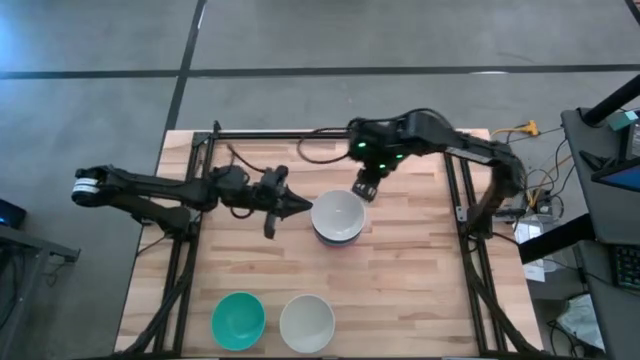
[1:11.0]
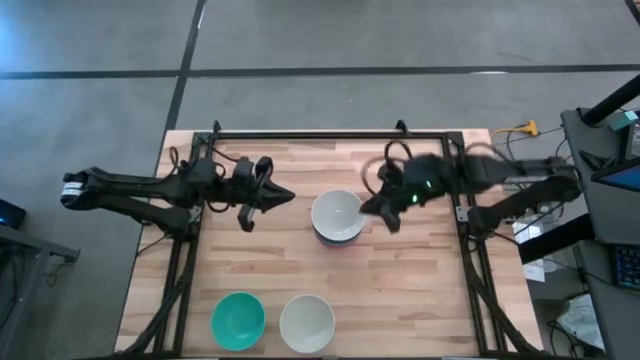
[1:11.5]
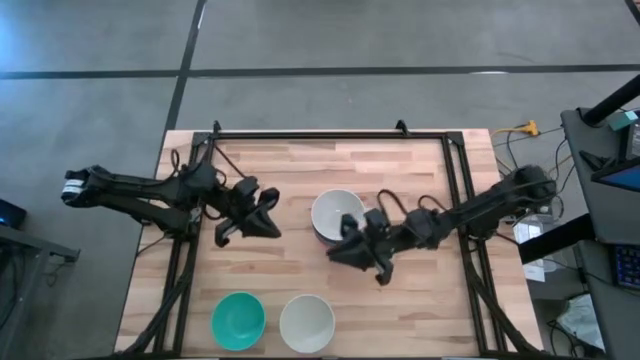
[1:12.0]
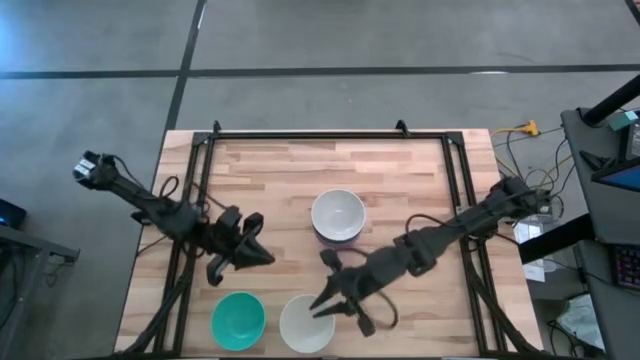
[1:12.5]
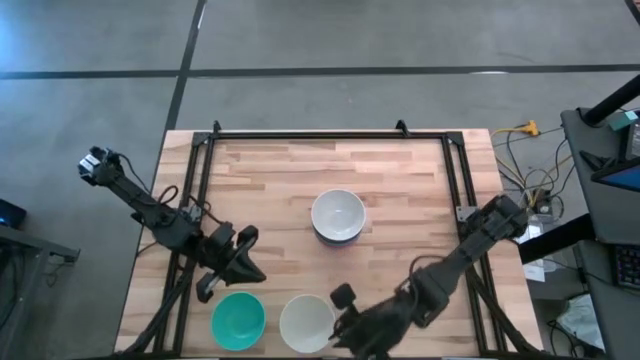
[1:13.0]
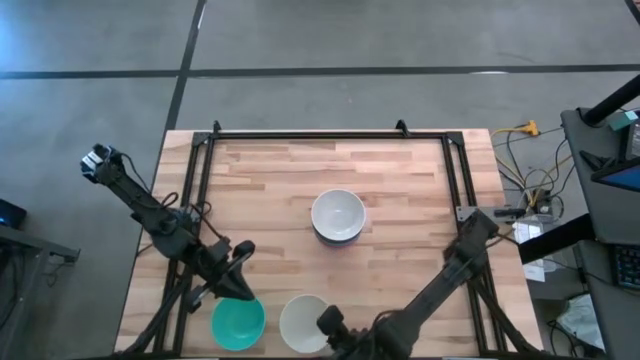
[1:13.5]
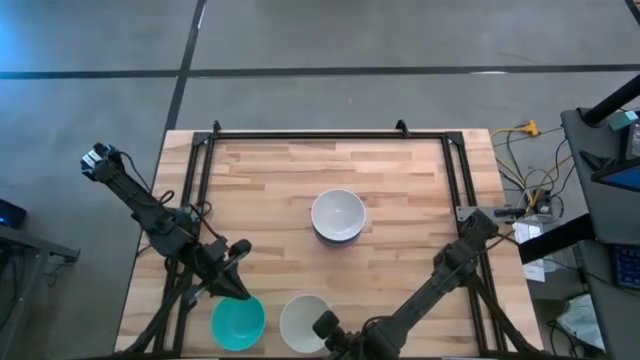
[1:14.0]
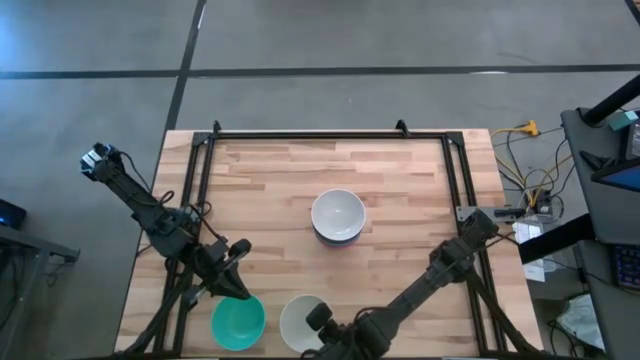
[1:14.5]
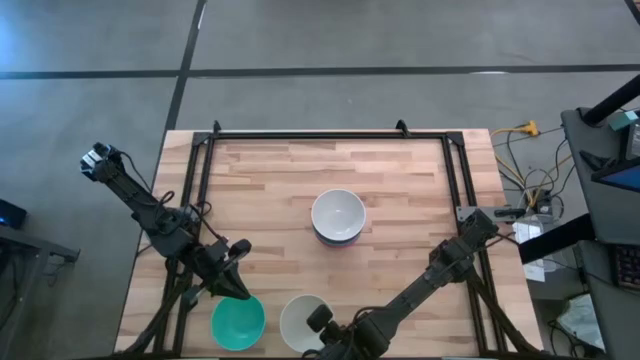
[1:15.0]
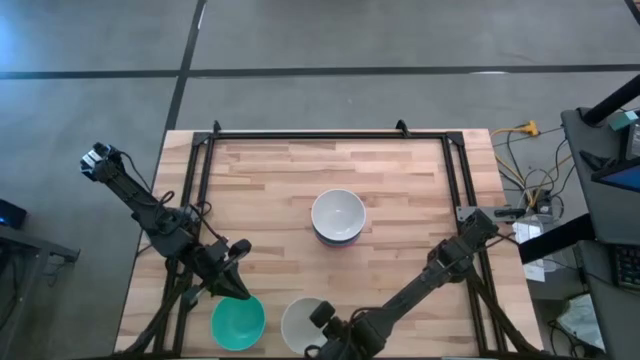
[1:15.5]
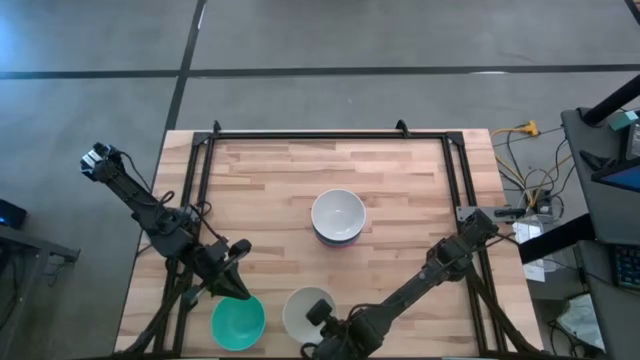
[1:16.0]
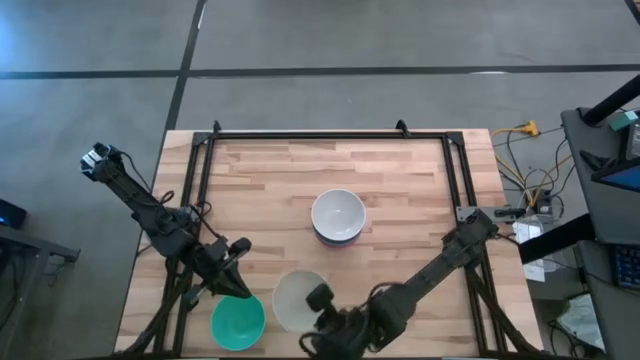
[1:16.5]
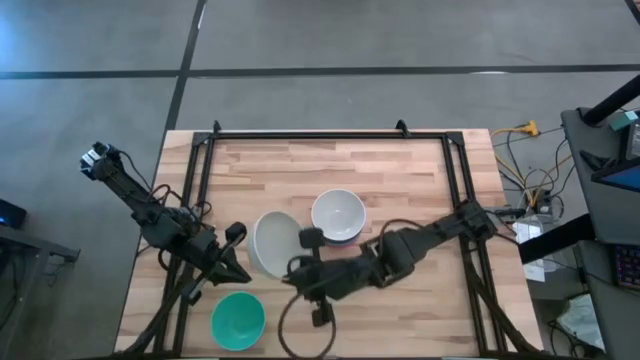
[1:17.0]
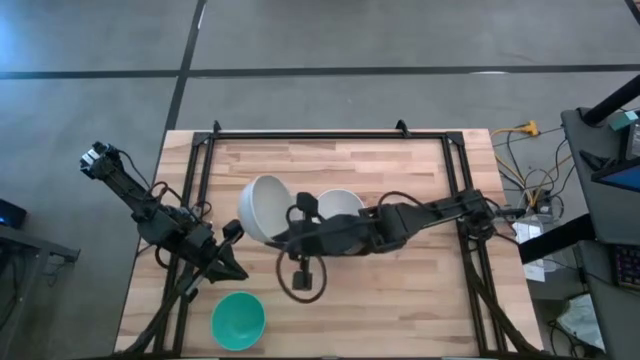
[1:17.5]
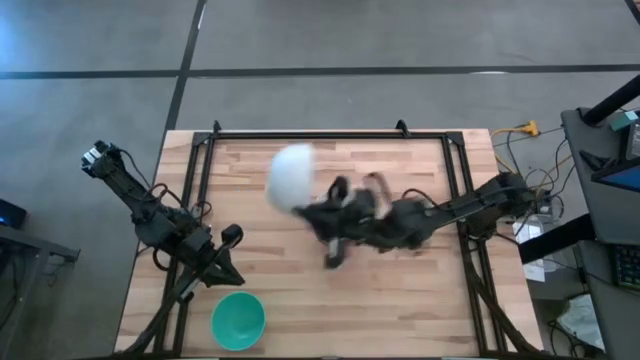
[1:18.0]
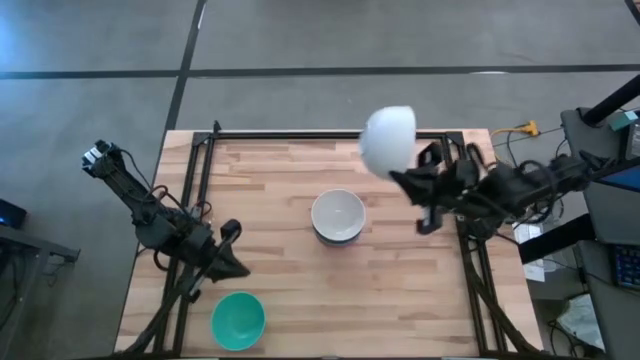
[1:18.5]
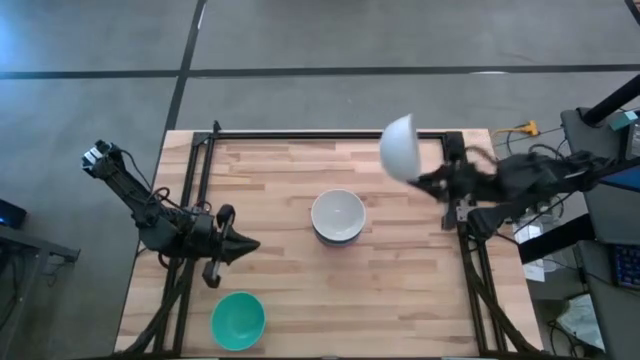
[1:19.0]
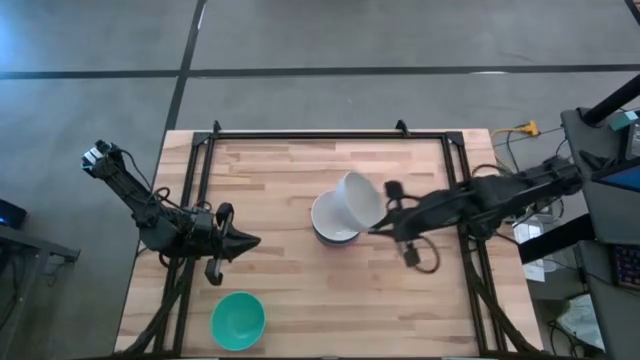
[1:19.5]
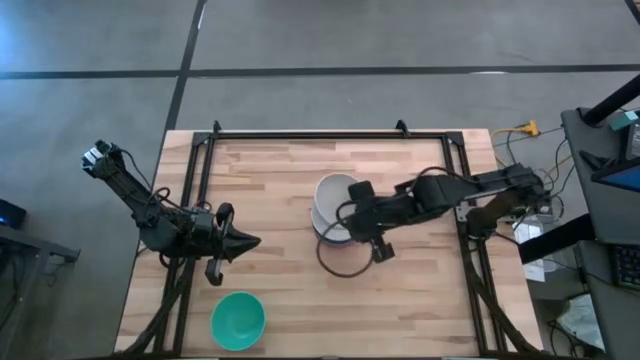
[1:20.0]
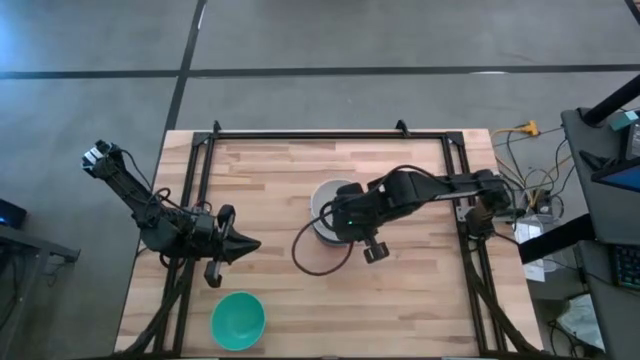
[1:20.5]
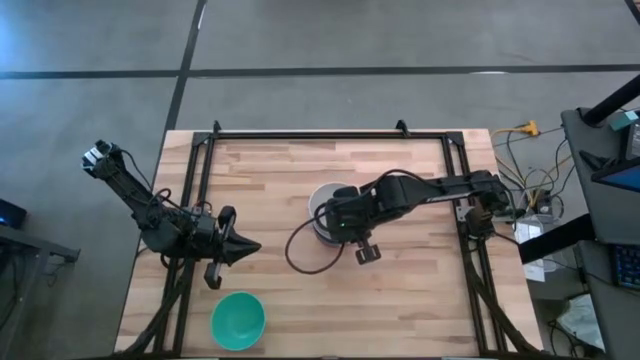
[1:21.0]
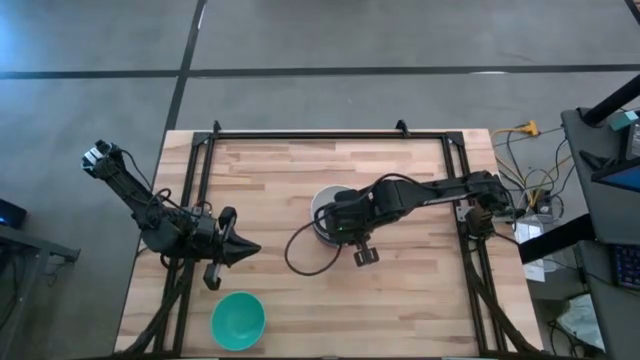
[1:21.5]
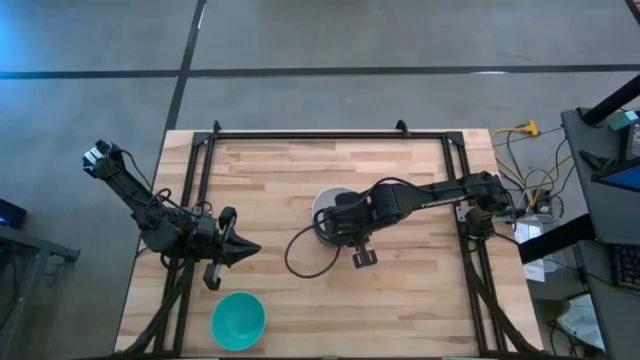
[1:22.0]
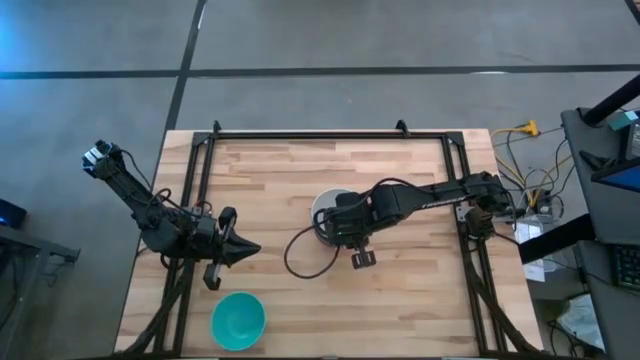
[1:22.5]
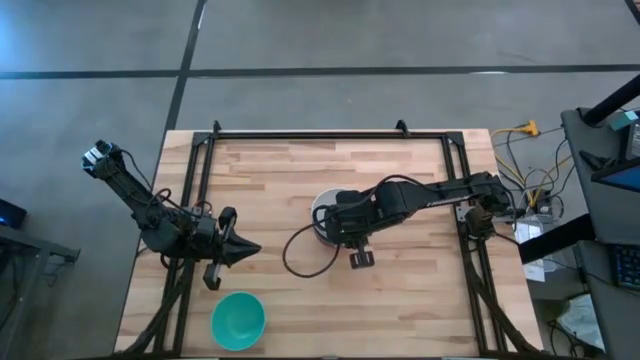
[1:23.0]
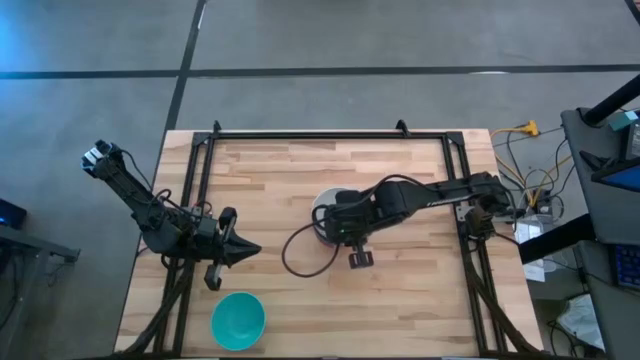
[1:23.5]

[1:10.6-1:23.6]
Task: Nest bowls inside each other
Stack the white bowl on the white bowl

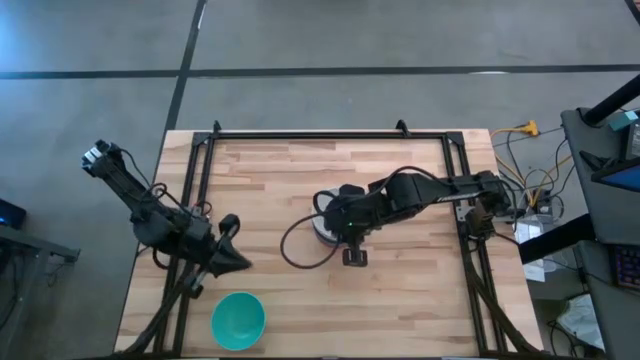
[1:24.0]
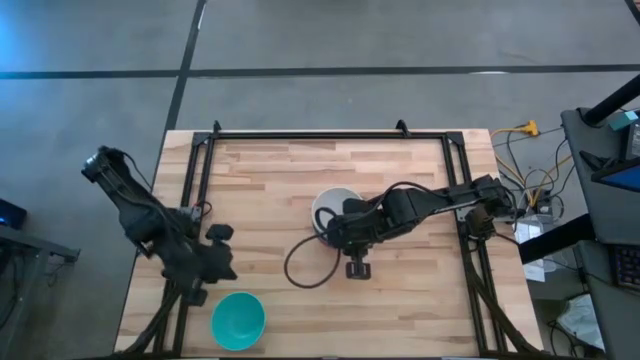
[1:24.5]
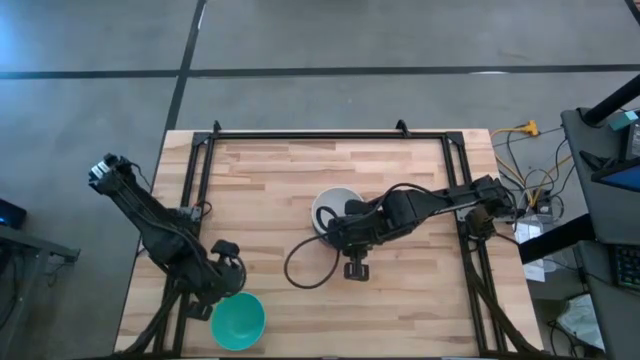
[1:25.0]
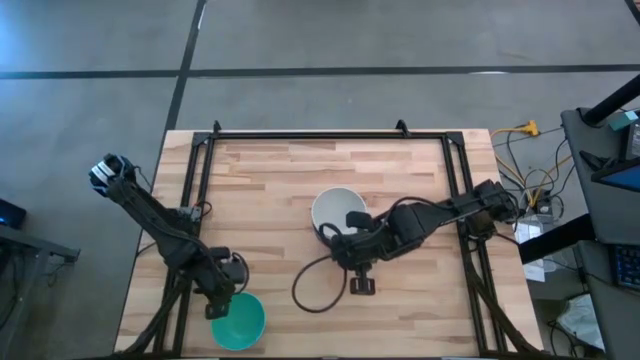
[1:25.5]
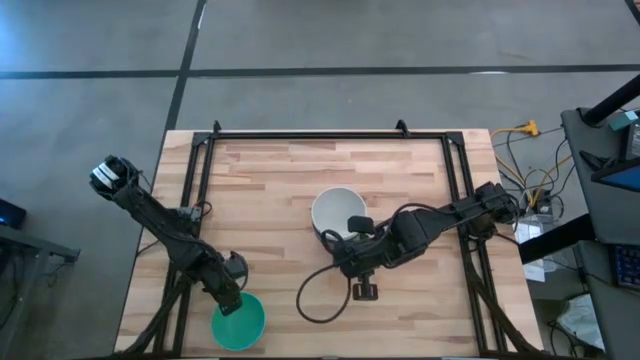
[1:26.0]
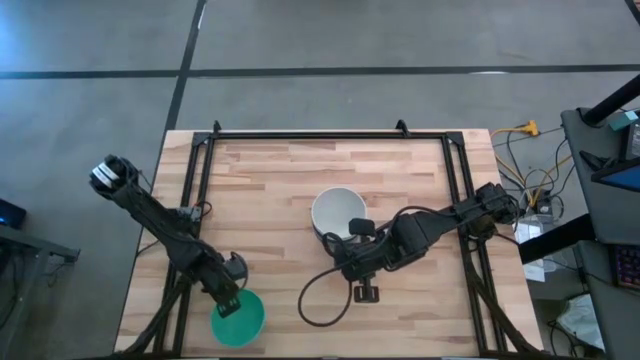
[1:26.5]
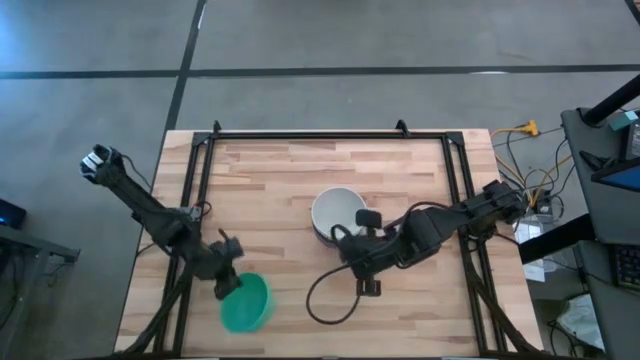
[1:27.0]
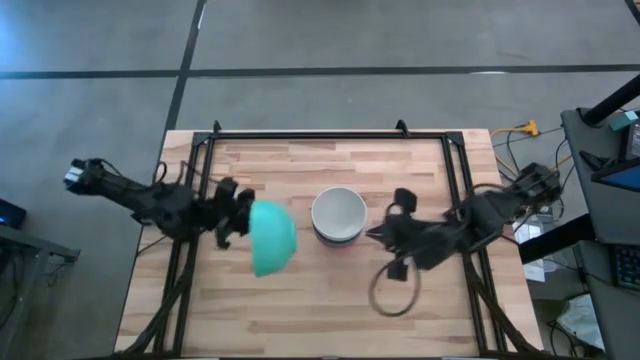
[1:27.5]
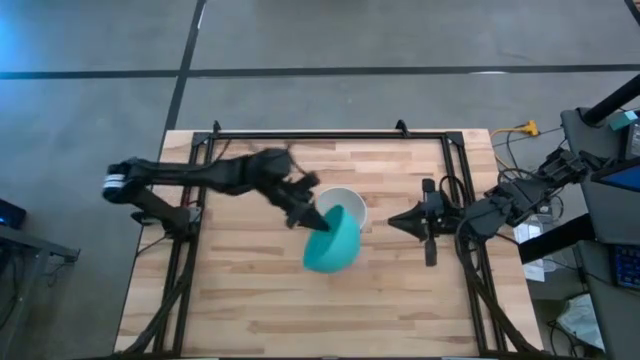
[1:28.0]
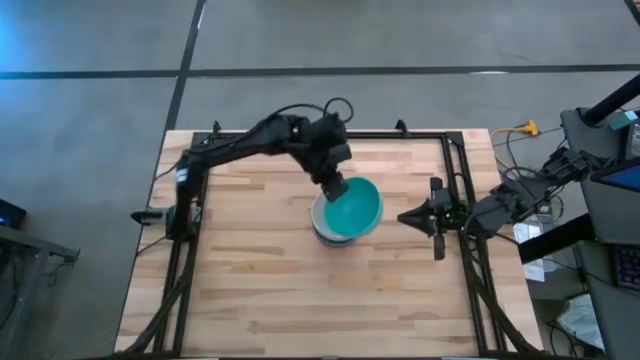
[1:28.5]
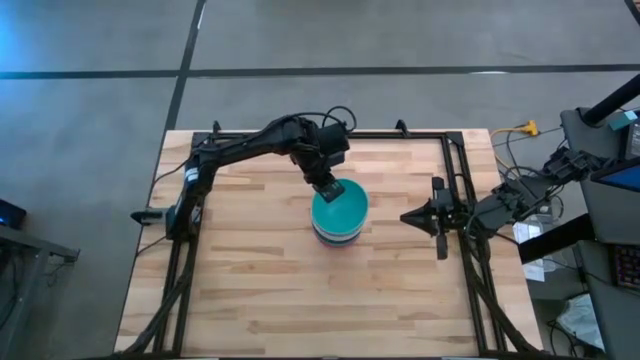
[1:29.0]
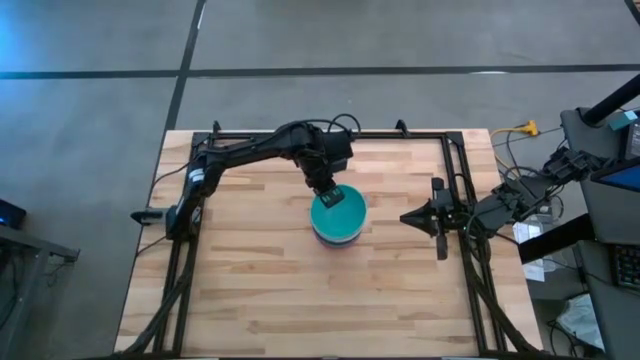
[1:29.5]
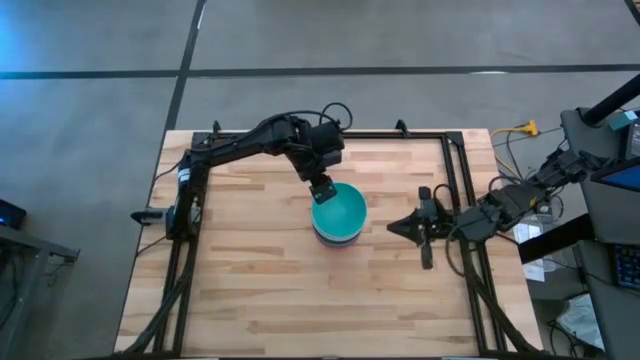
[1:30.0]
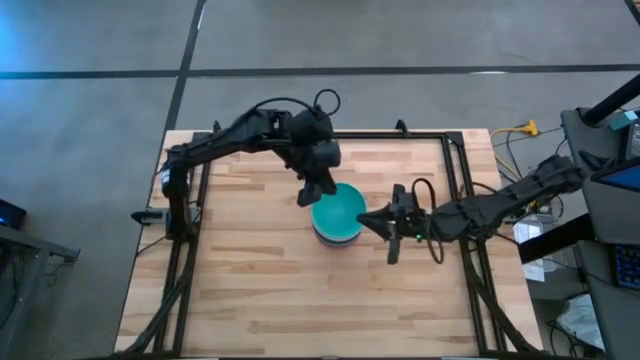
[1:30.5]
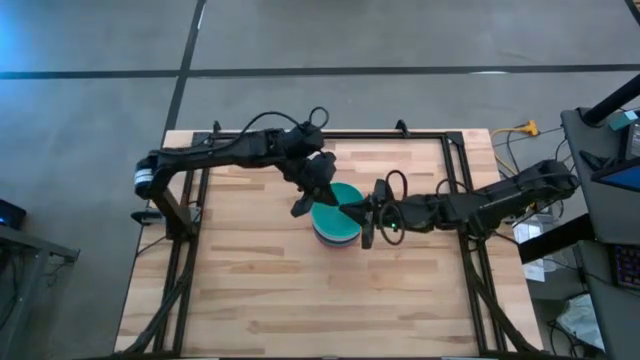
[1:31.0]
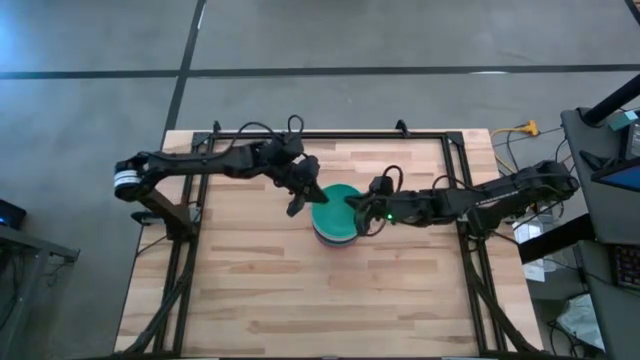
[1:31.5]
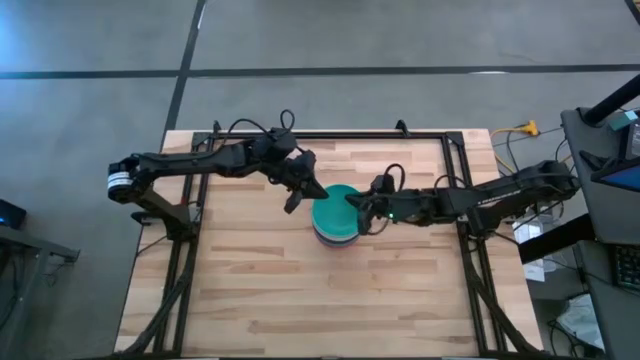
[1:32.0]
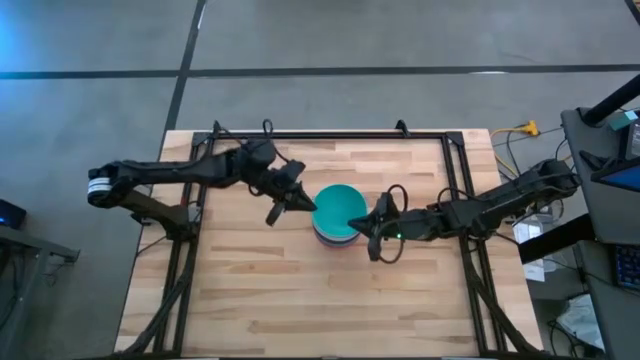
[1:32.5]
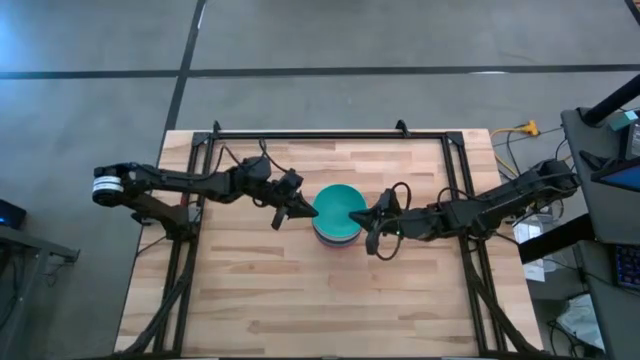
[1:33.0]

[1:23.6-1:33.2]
Stack the light blue bowl on the white bowl
